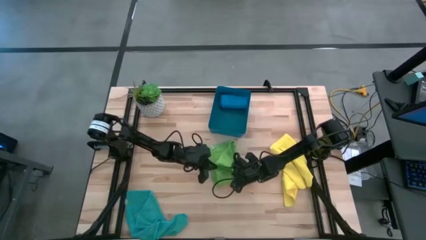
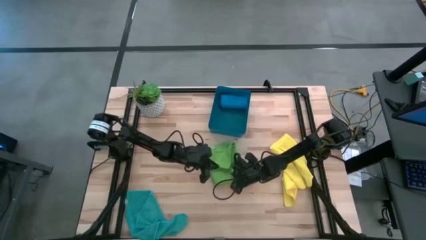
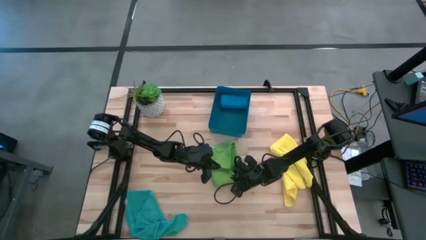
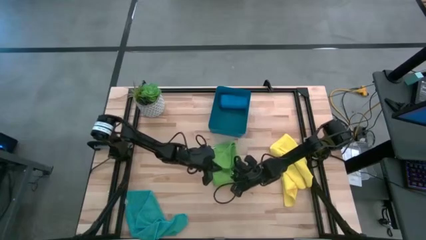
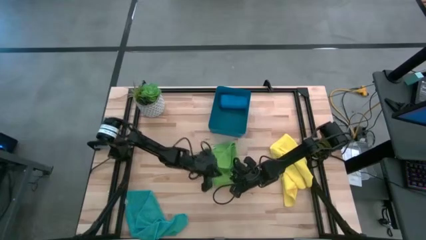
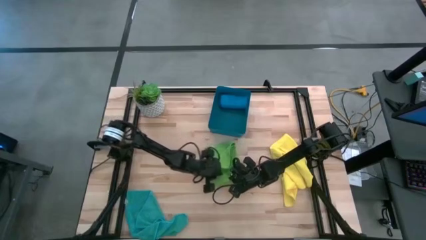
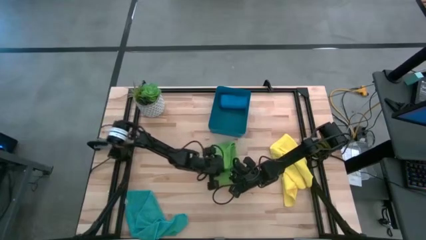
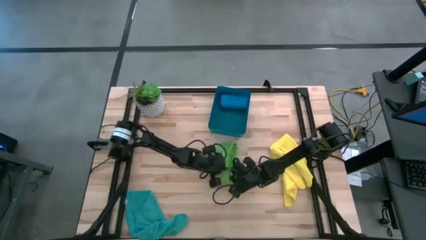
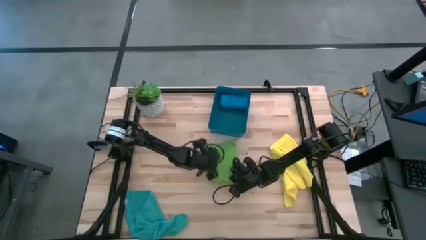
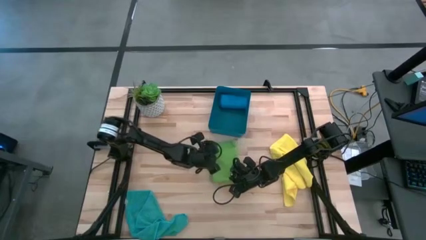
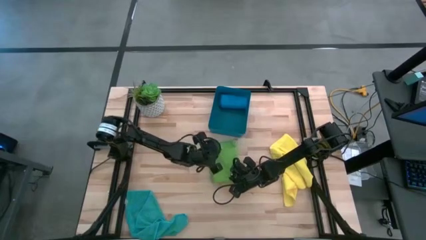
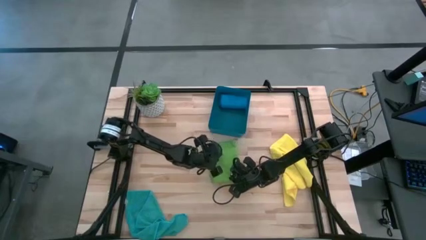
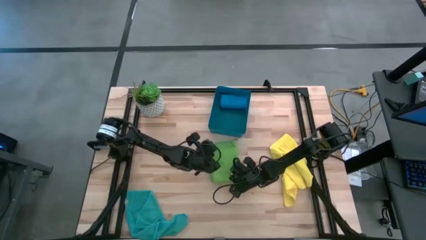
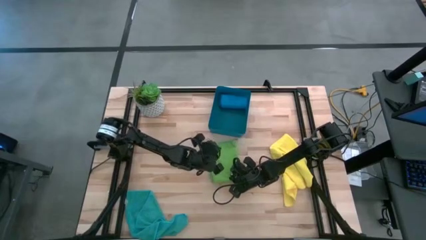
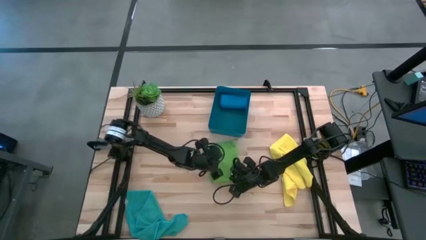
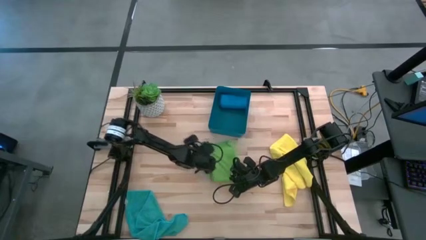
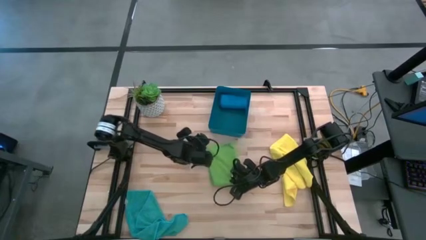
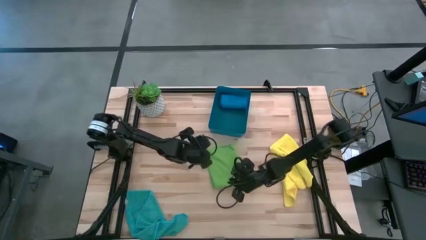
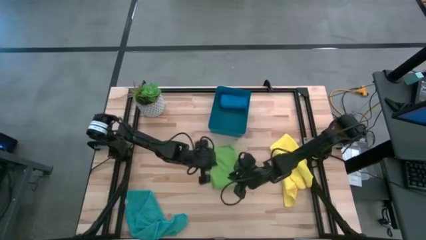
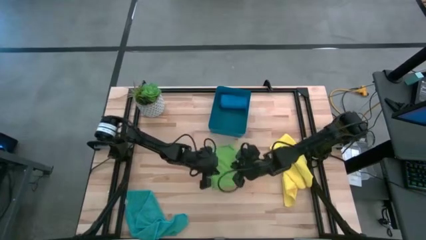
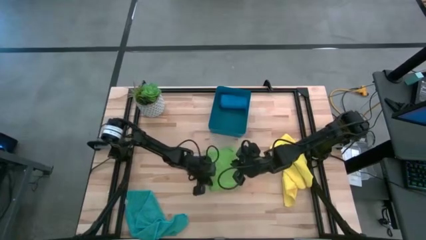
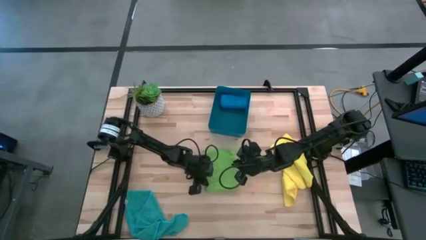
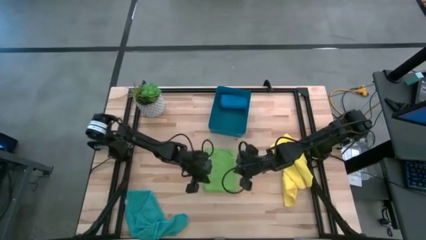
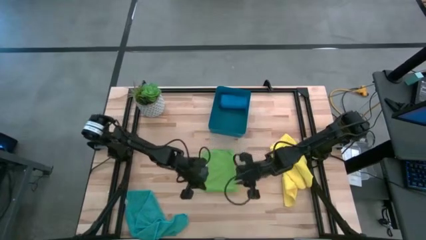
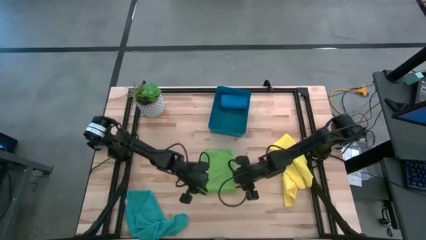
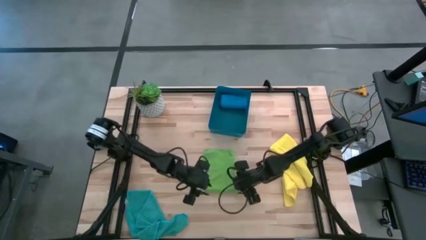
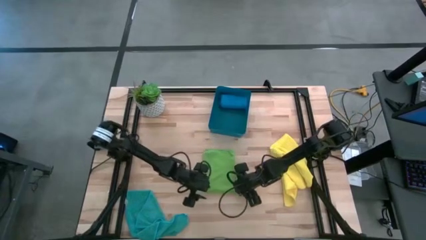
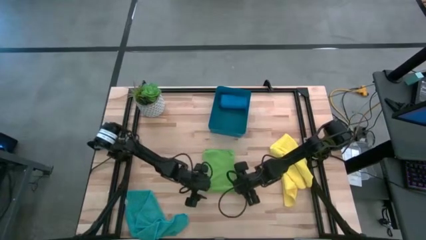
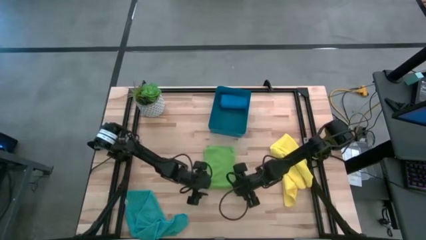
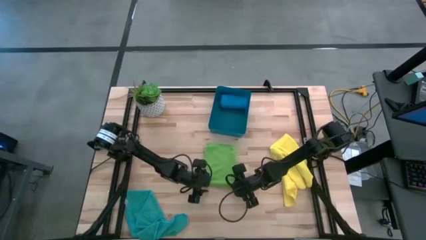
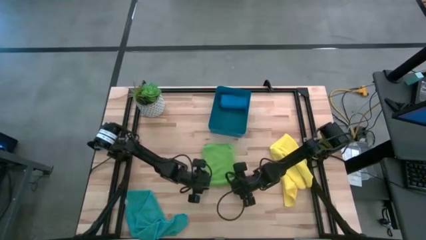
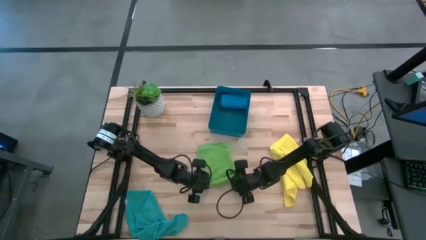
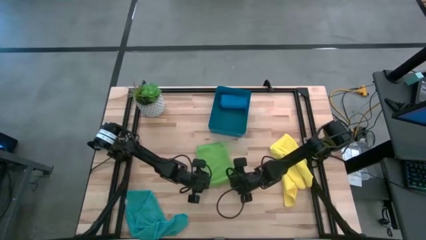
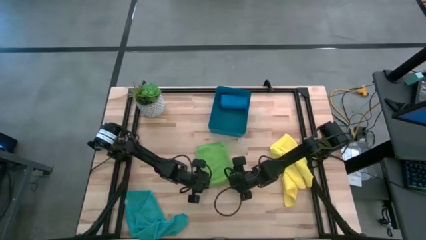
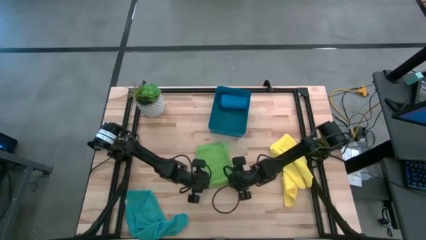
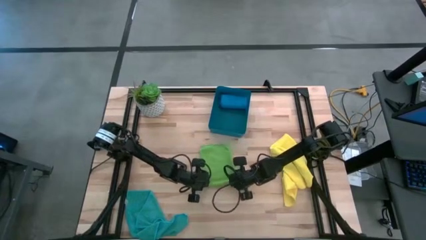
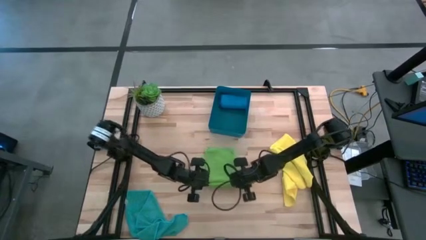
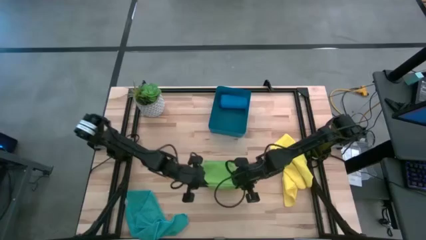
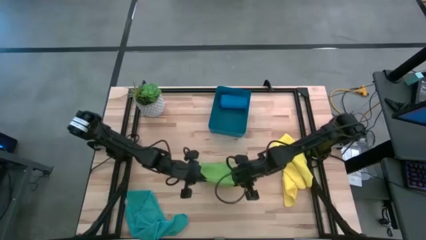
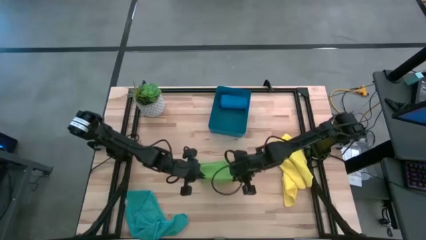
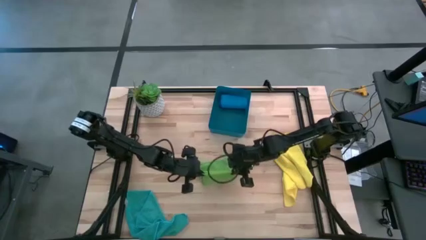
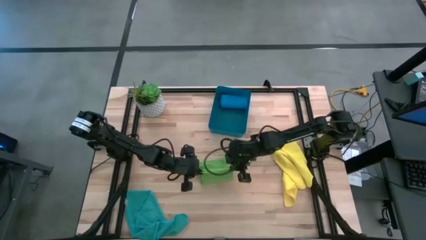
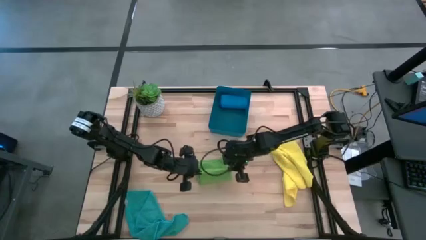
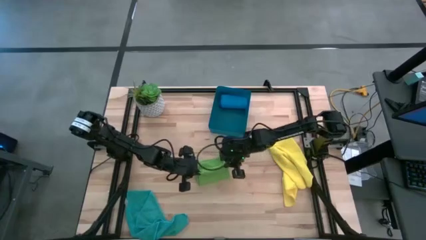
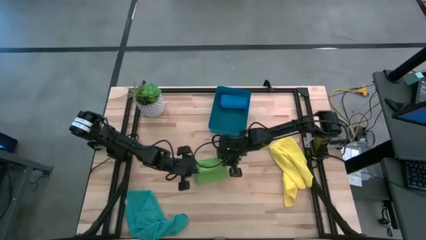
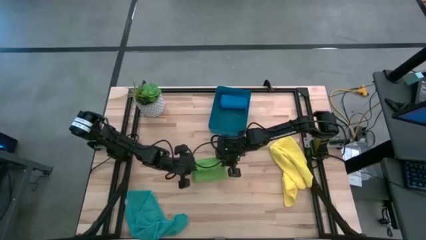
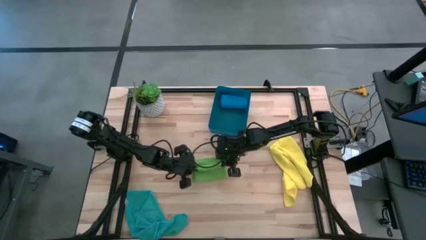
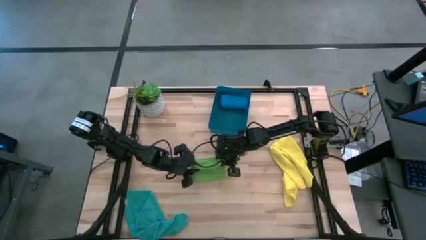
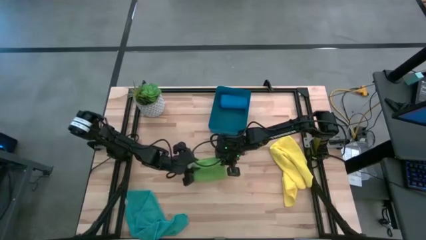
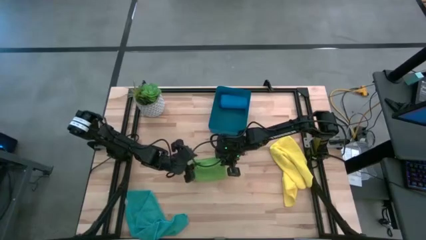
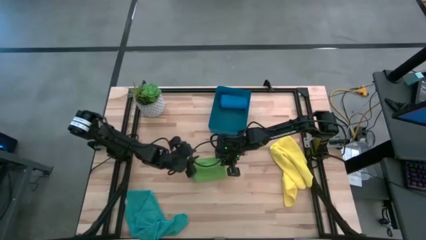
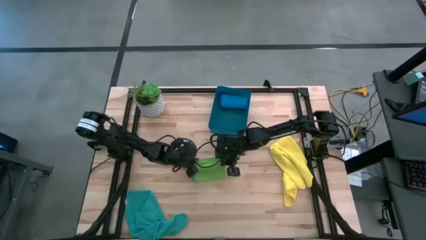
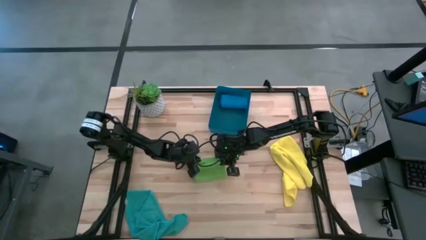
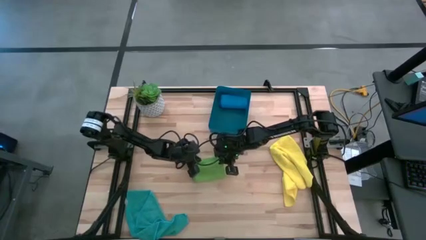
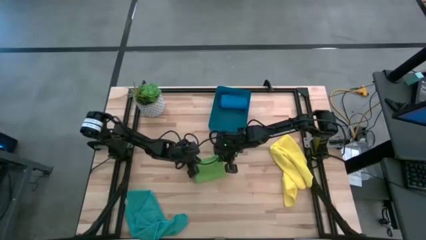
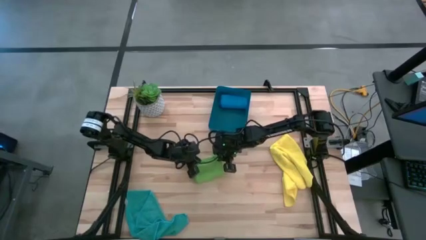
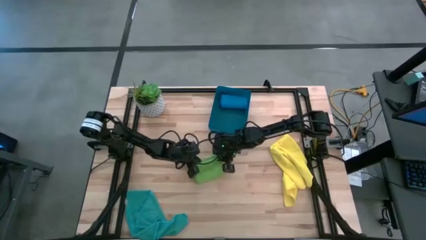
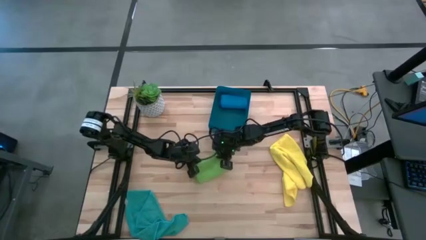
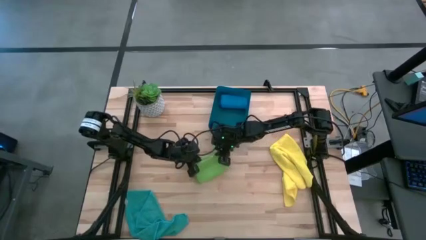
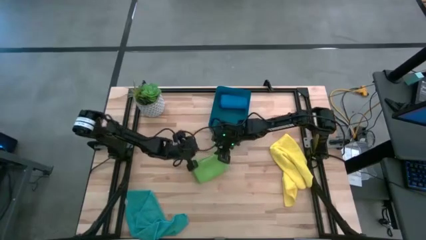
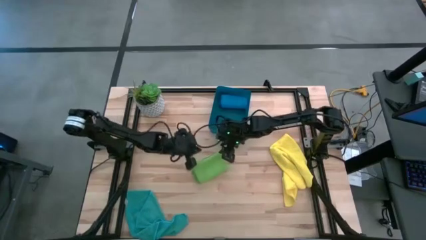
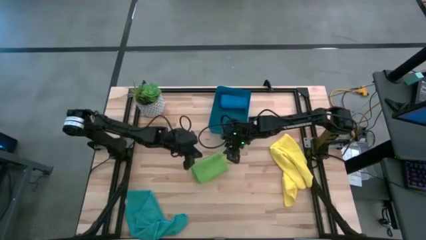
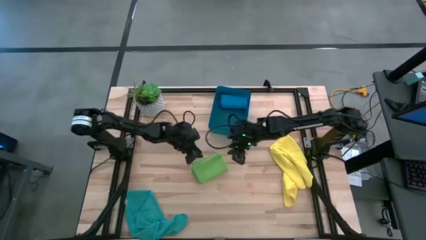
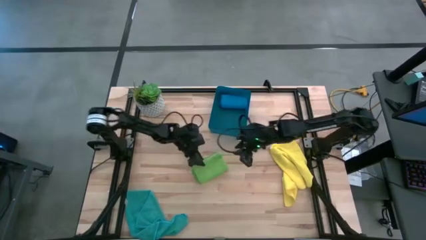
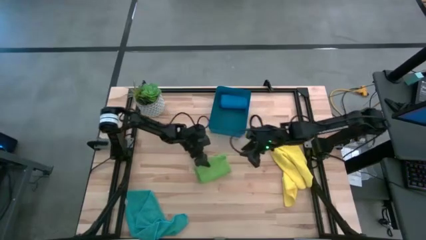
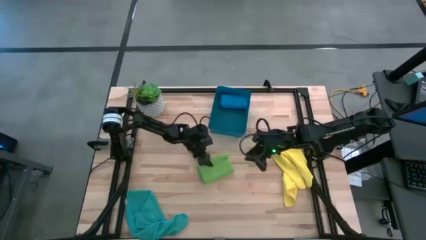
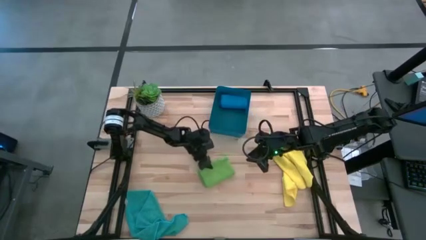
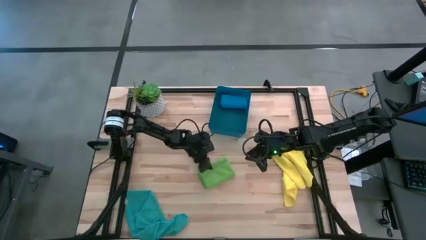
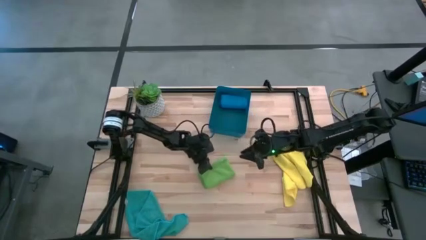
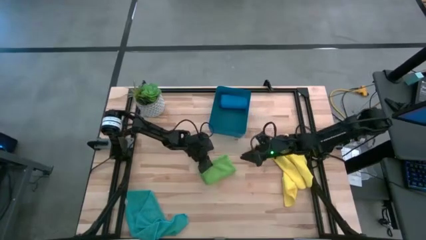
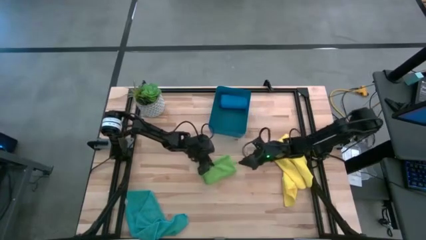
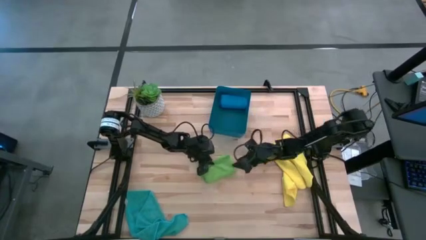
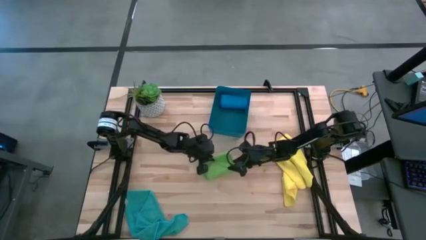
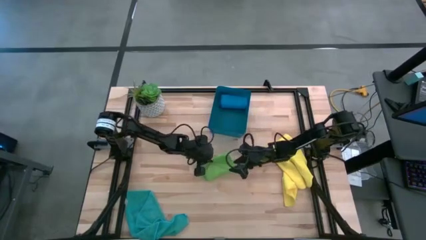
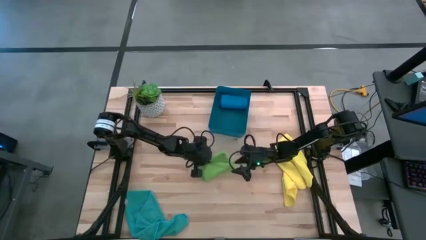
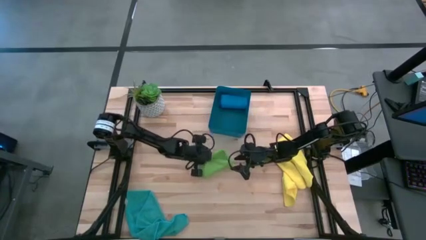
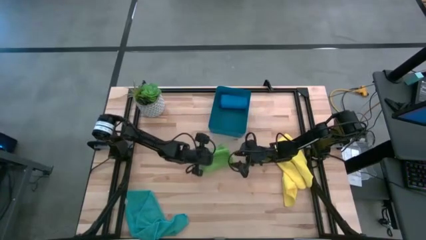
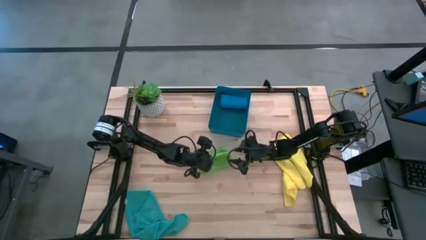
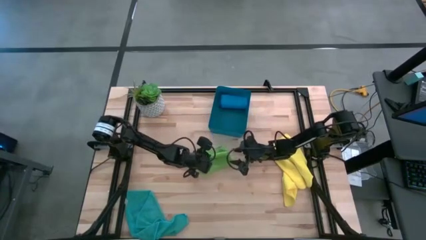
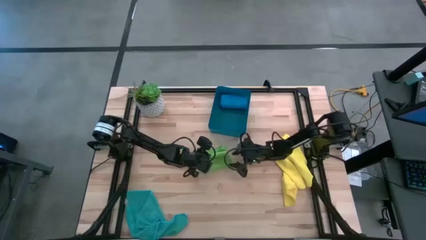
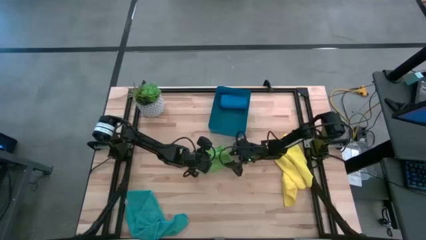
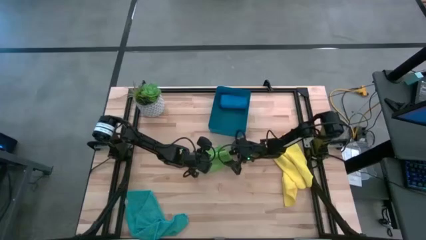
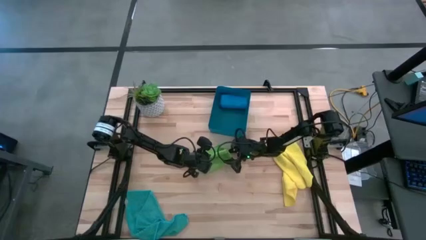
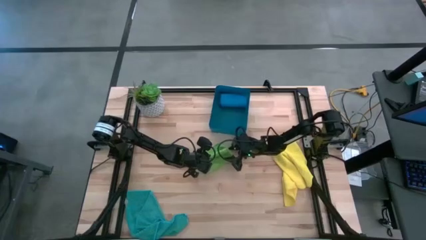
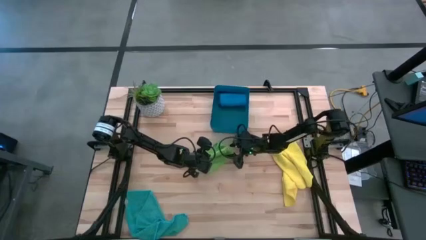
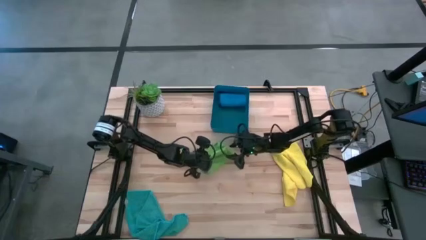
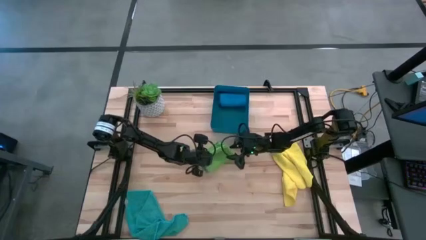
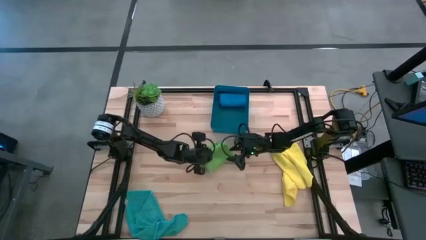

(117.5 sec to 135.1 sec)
Task: Fold microfiber towels
Fold the green microfiber cloth
